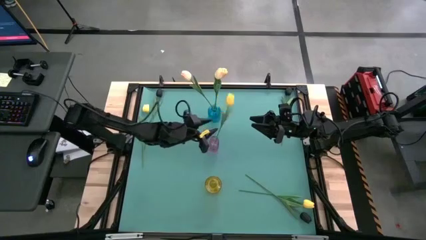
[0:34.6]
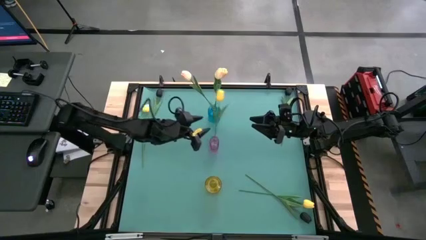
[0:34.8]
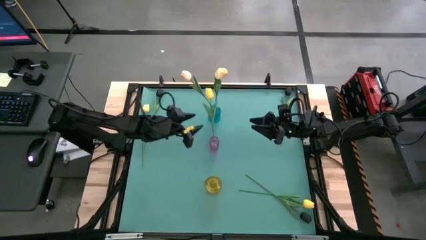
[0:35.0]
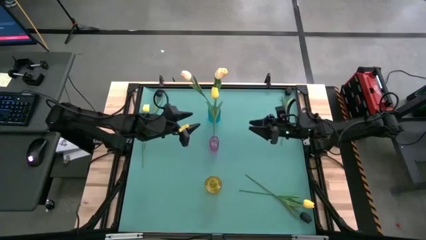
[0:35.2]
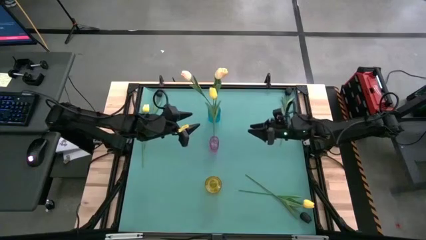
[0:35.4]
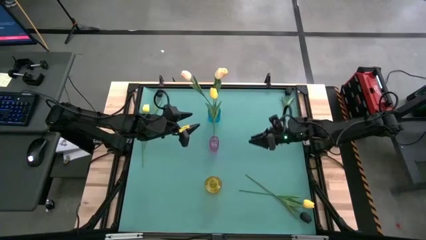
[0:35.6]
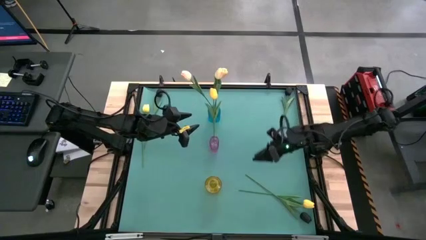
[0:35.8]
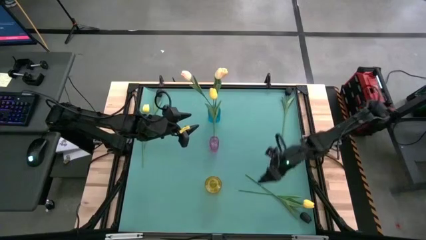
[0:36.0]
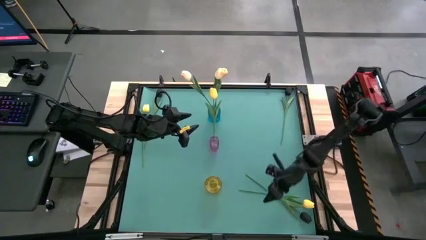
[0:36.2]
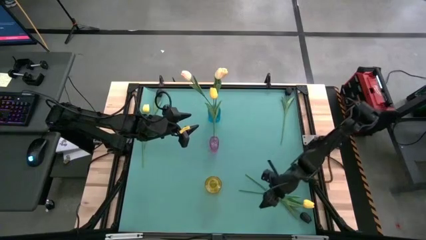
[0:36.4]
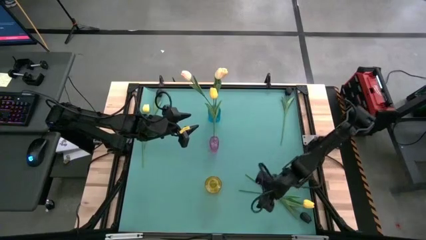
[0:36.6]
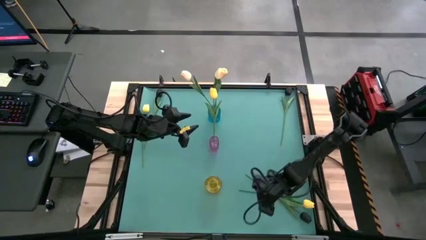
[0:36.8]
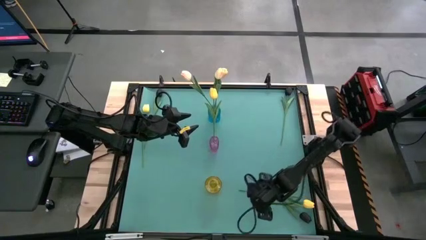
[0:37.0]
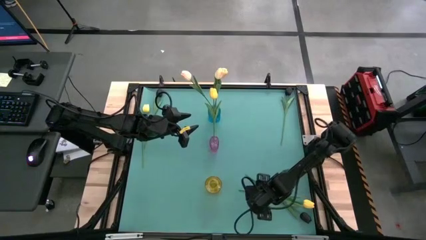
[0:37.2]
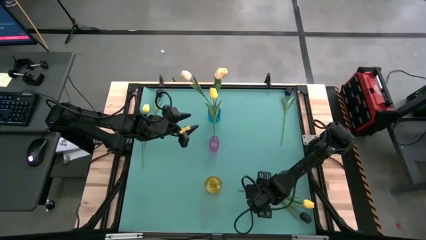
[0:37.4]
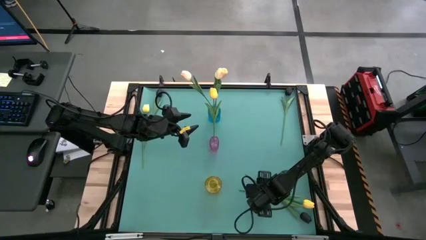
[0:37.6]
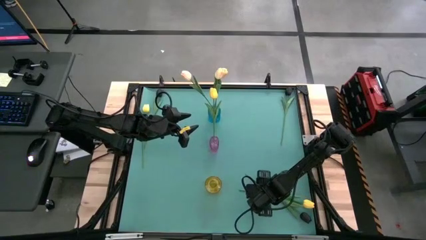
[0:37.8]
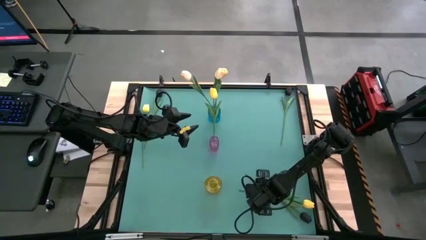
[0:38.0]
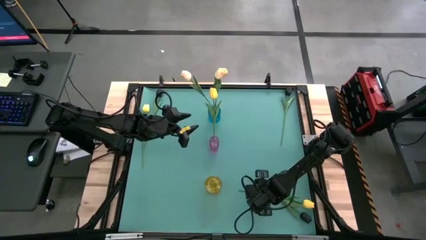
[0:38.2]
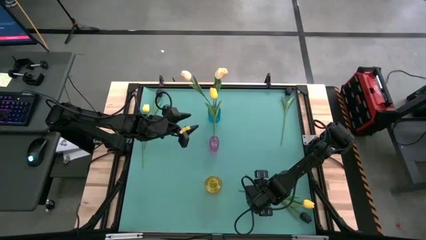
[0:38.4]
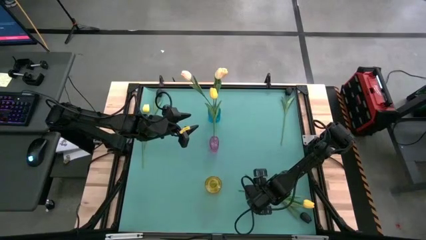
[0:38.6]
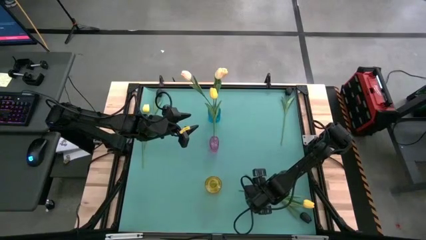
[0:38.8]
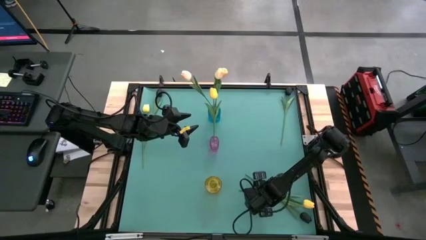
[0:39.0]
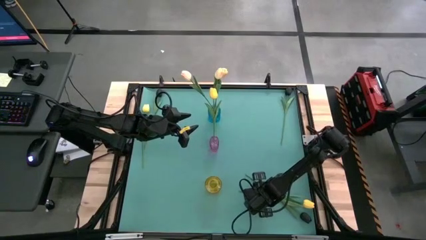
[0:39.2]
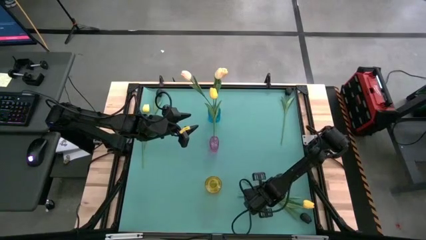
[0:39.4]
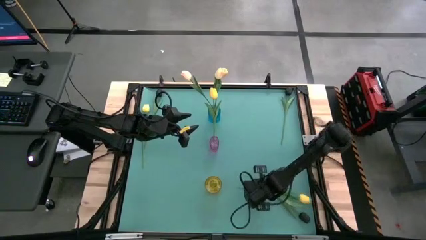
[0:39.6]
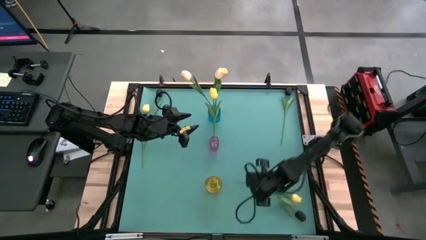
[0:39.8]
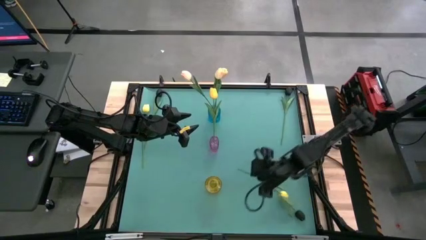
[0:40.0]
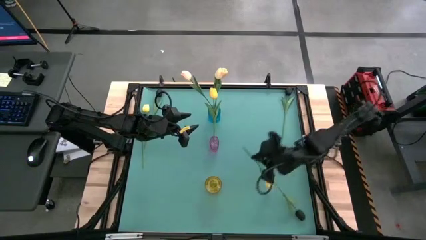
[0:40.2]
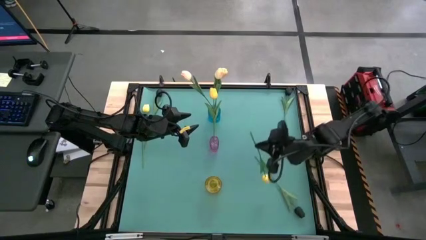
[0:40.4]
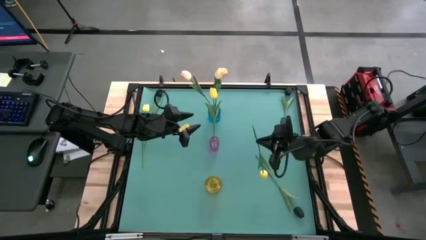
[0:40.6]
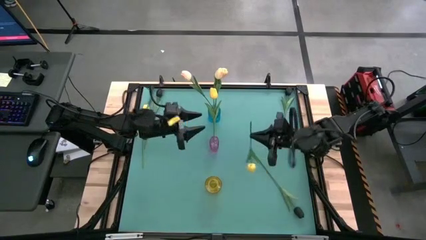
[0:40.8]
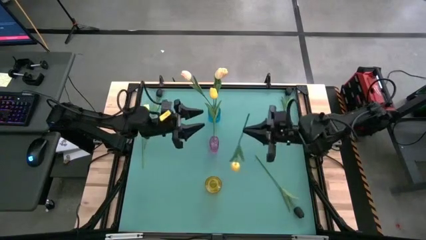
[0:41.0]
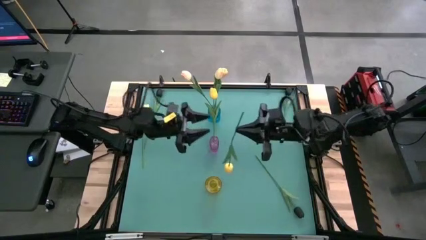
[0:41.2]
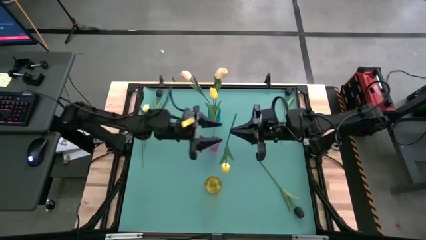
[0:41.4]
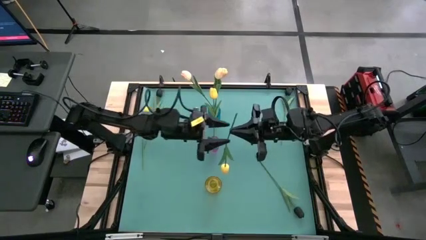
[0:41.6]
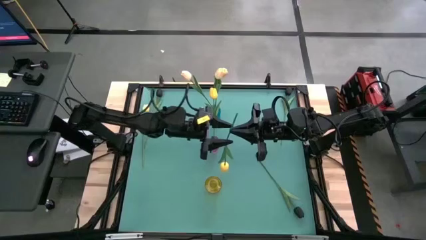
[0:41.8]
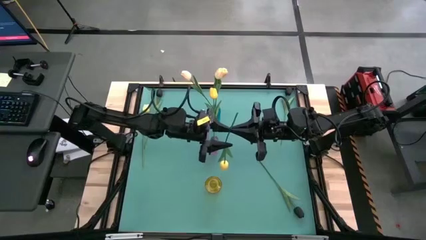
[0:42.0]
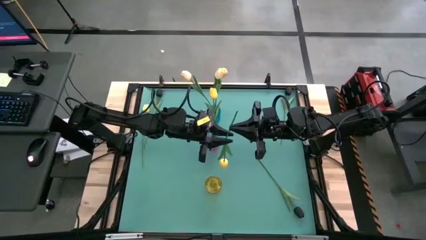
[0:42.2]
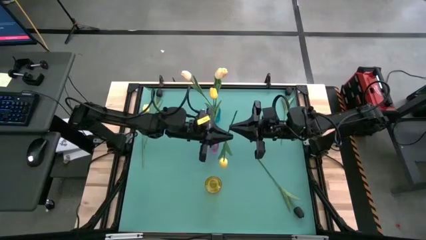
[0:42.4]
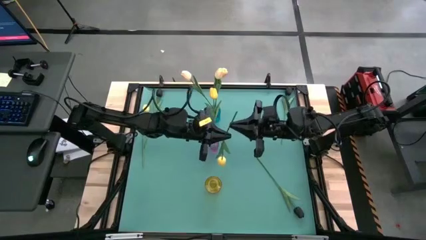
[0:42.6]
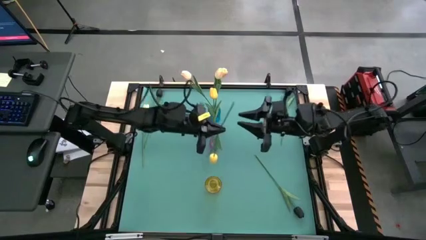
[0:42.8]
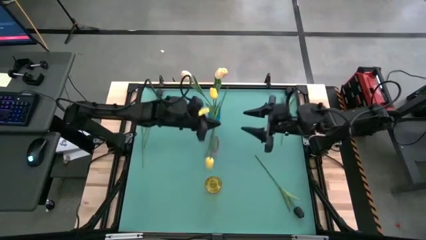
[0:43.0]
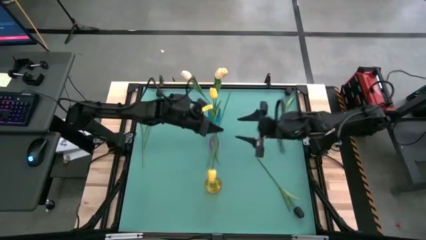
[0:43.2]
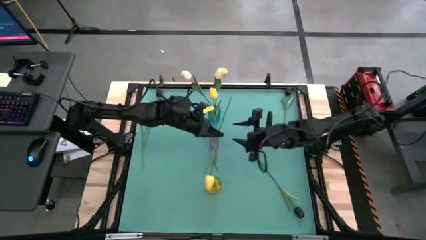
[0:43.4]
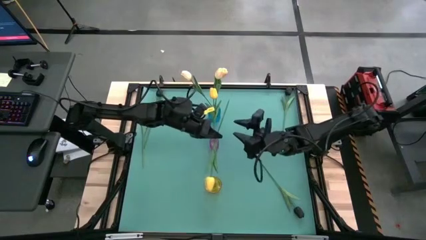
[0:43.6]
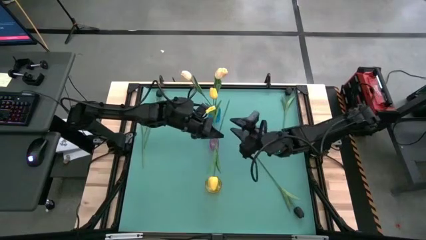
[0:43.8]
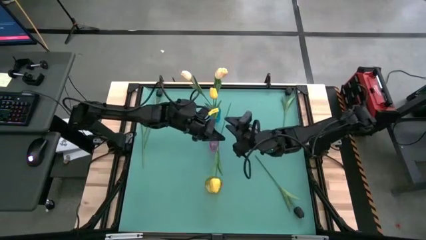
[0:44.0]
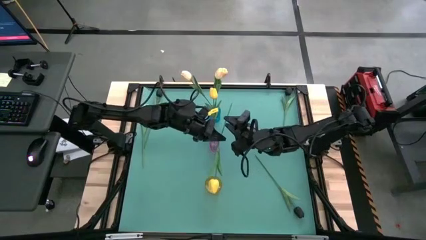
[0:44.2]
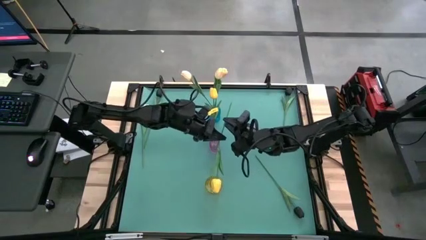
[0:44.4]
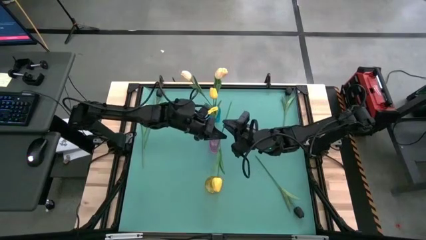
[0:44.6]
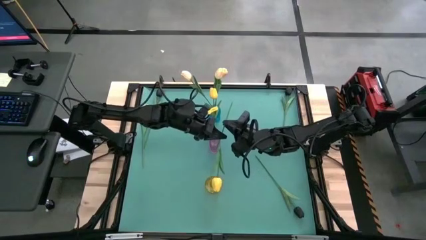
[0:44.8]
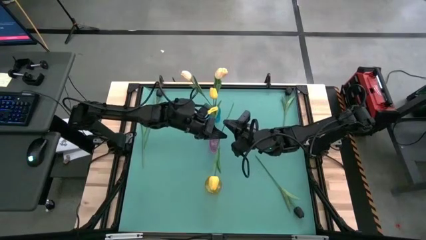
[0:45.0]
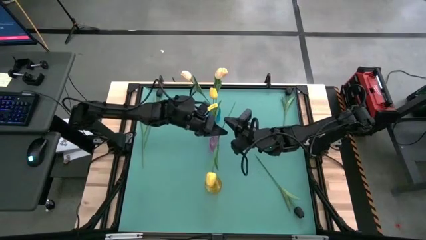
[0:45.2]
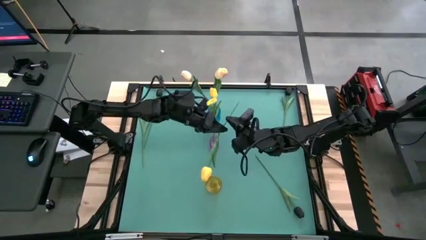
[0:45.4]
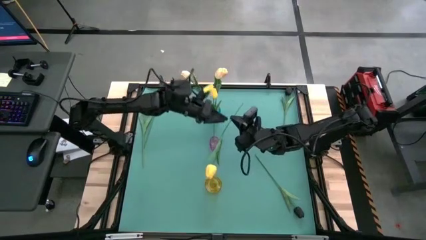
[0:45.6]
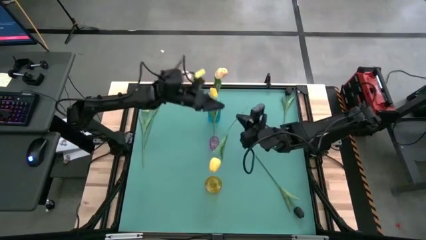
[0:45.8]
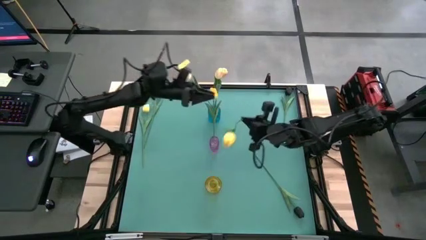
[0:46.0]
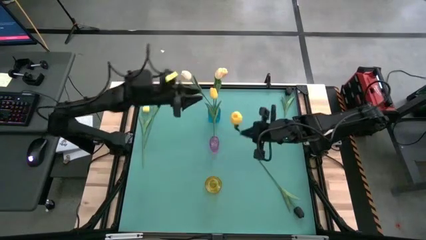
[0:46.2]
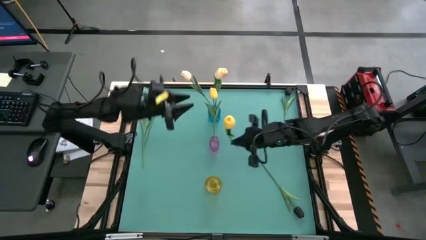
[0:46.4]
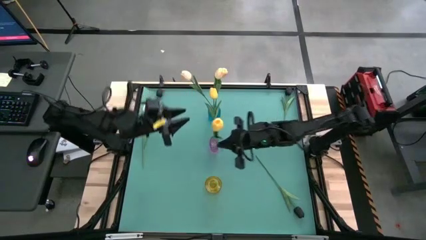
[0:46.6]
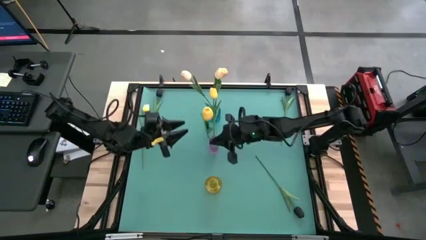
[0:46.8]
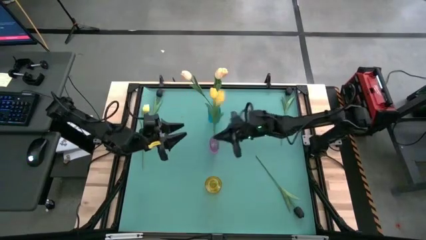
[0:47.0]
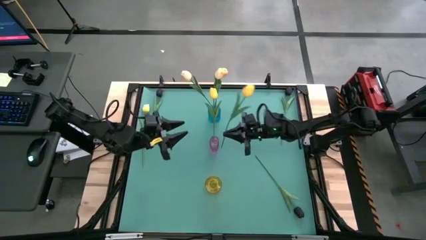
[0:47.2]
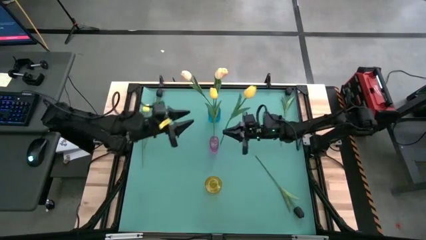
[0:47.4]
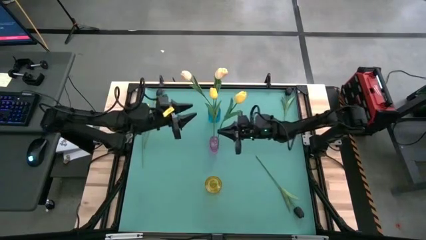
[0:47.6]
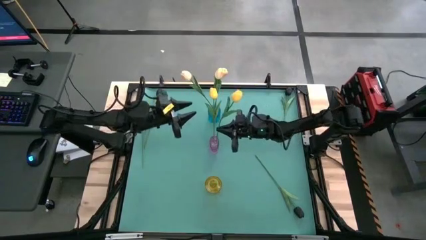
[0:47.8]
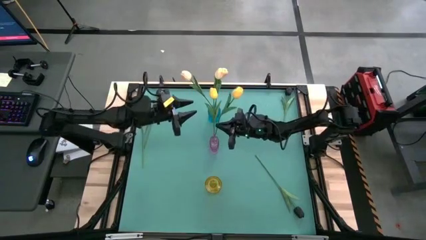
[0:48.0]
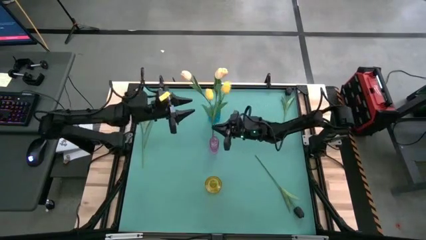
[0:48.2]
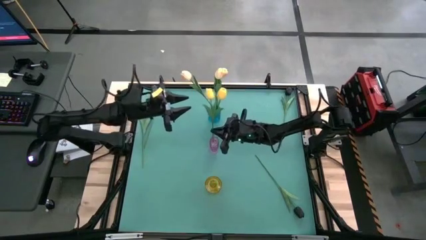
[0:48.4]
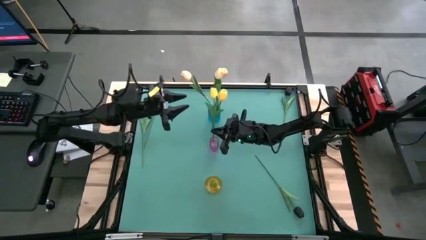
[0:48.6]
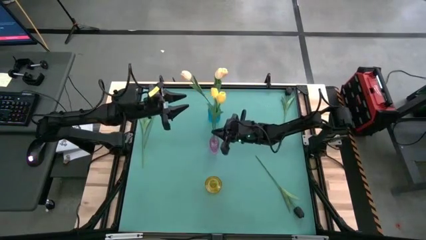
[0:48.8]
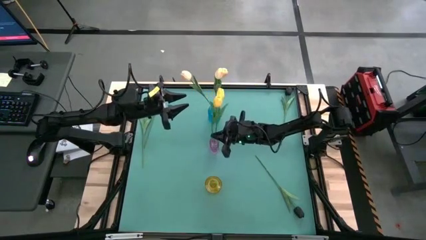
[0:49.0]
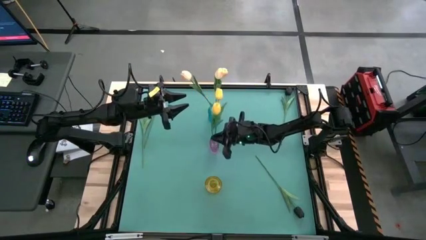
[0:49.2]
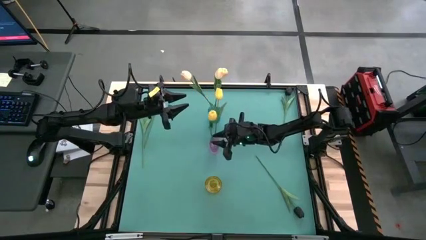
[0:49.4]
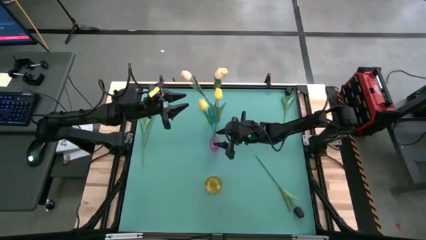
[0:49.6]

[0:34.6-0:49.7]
Task: Sort flowers into vase by color
Put the right yellow flower into the purple vase
